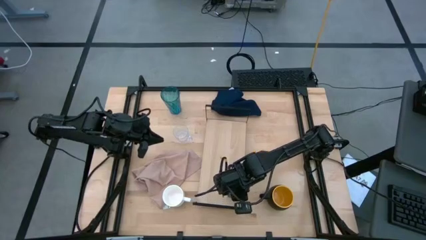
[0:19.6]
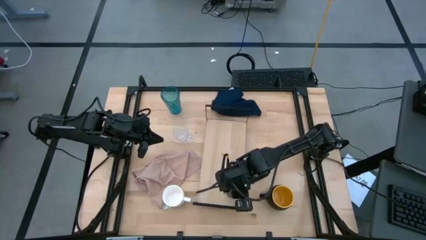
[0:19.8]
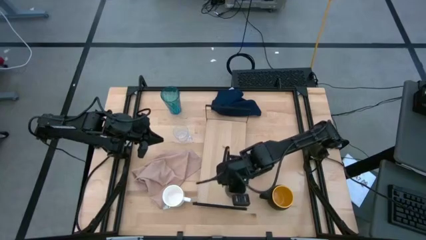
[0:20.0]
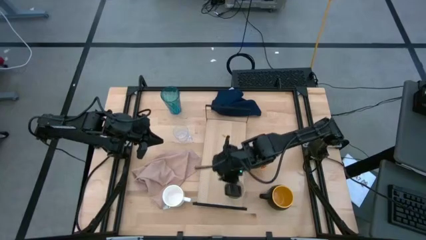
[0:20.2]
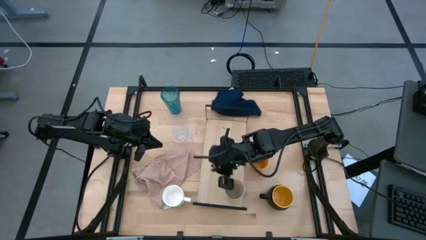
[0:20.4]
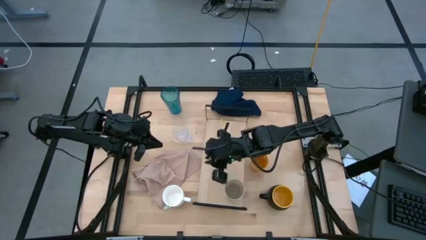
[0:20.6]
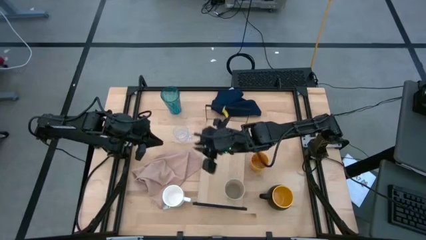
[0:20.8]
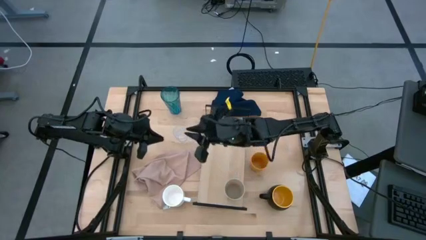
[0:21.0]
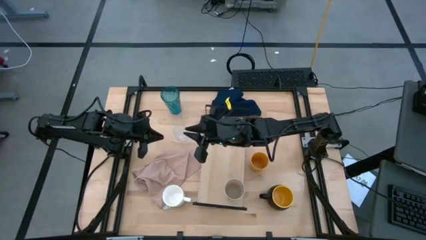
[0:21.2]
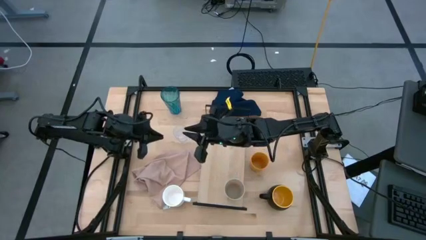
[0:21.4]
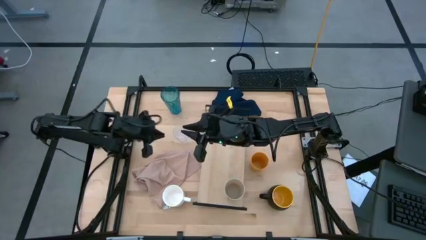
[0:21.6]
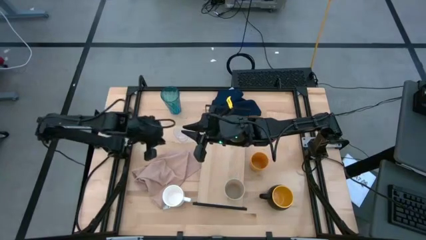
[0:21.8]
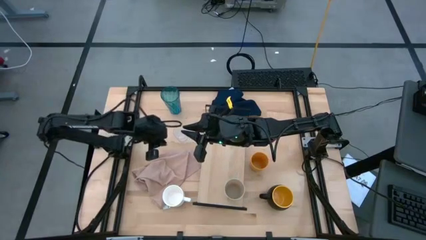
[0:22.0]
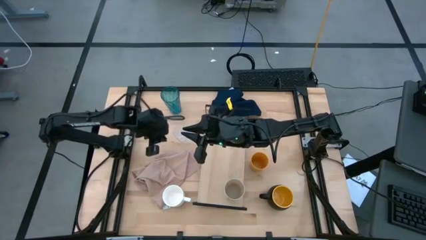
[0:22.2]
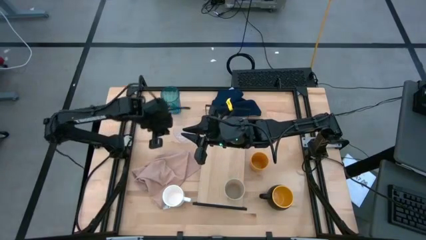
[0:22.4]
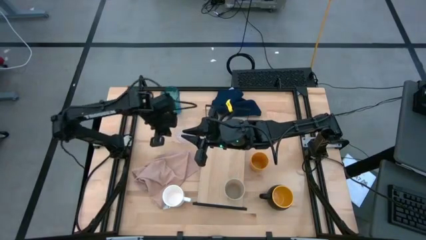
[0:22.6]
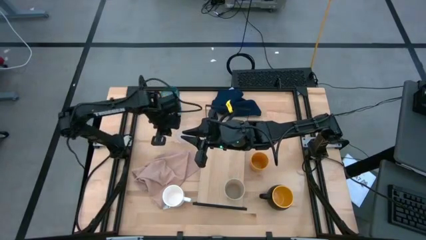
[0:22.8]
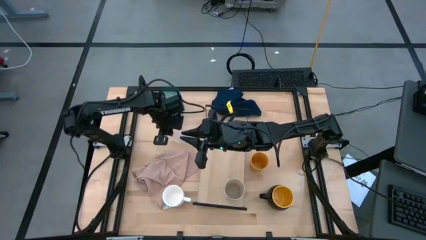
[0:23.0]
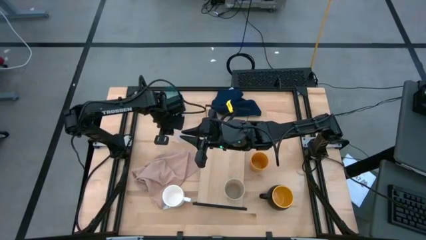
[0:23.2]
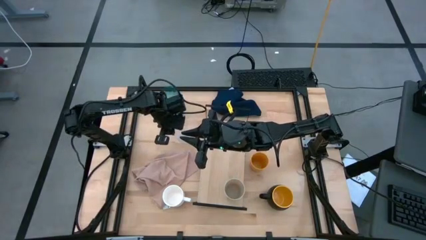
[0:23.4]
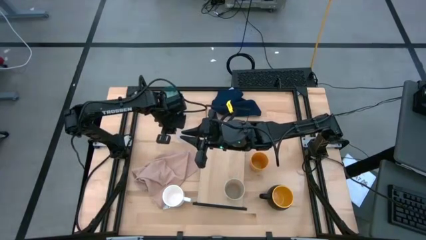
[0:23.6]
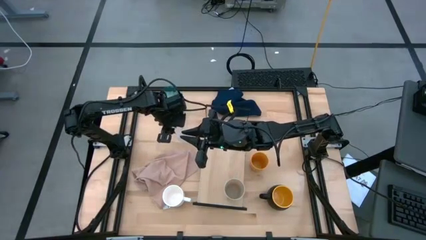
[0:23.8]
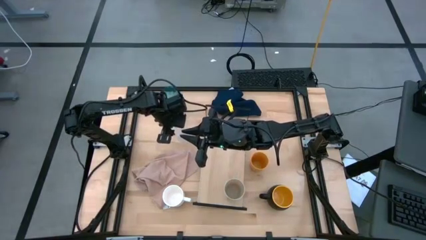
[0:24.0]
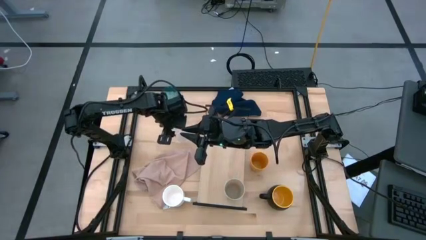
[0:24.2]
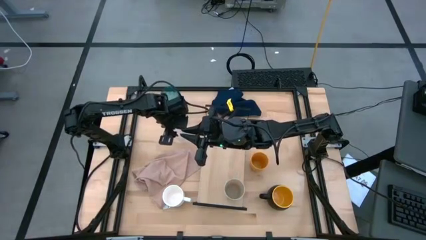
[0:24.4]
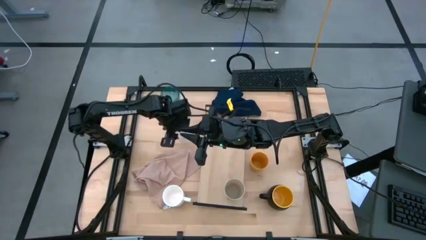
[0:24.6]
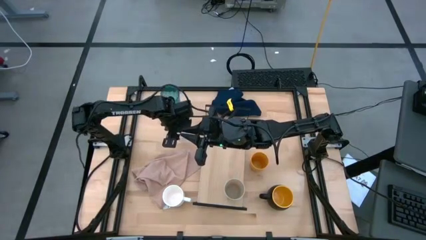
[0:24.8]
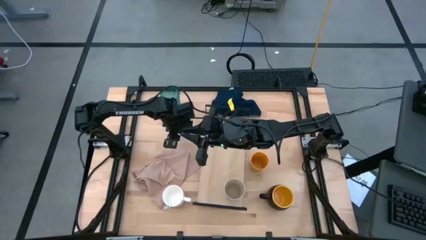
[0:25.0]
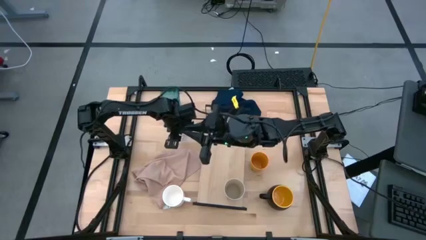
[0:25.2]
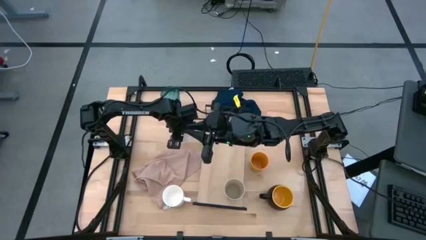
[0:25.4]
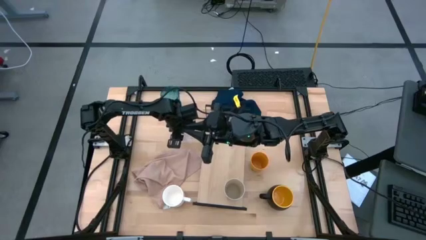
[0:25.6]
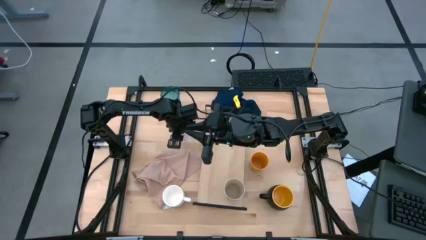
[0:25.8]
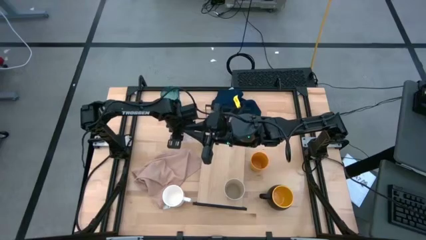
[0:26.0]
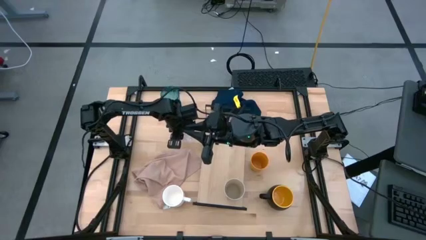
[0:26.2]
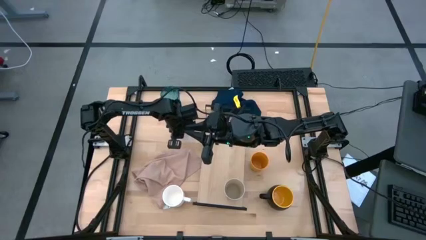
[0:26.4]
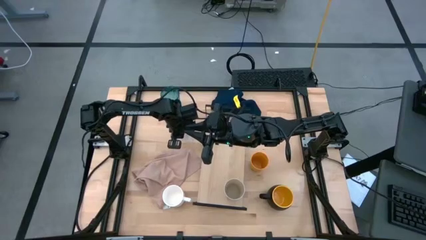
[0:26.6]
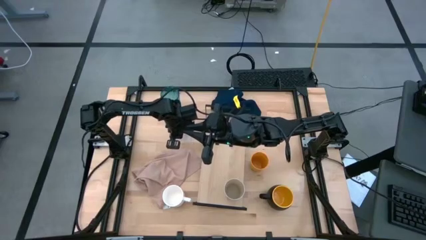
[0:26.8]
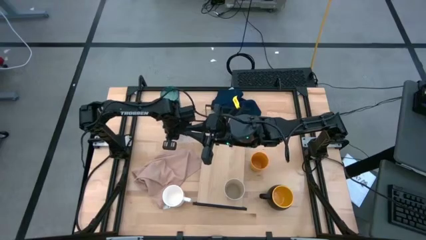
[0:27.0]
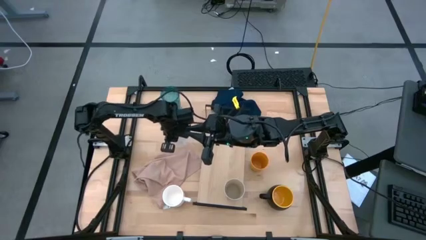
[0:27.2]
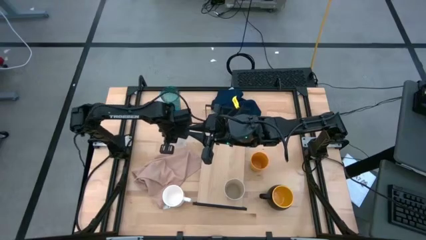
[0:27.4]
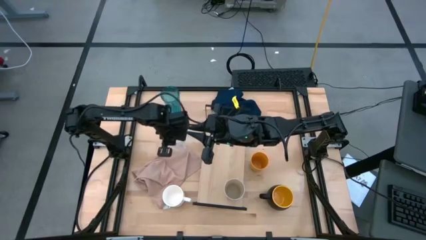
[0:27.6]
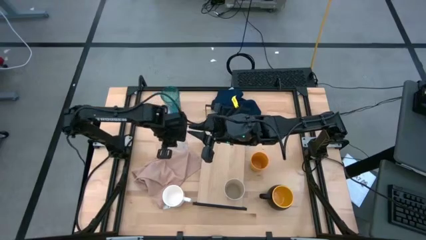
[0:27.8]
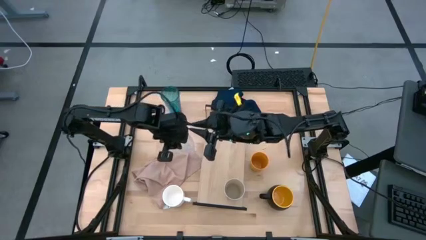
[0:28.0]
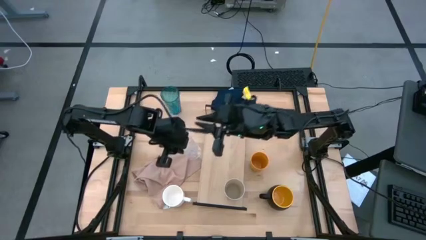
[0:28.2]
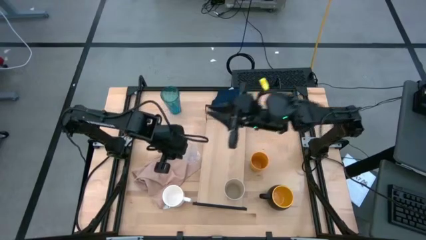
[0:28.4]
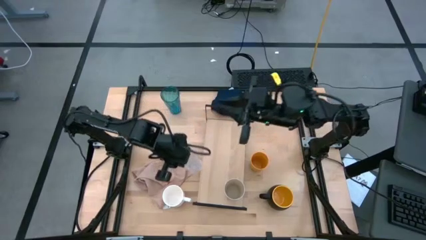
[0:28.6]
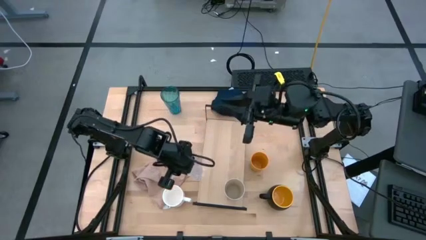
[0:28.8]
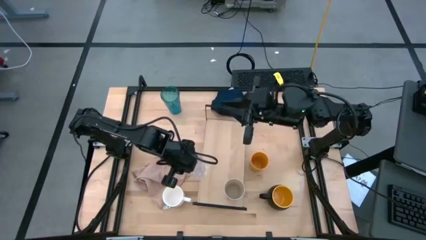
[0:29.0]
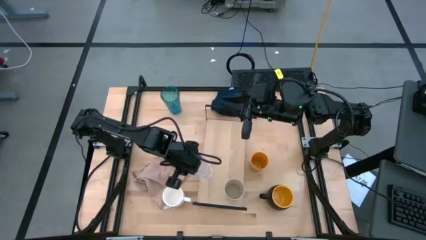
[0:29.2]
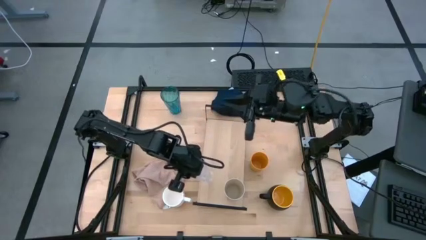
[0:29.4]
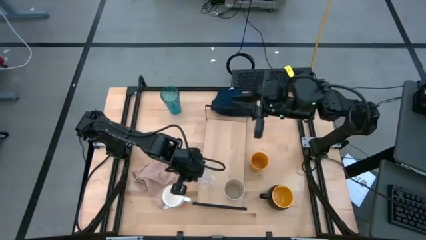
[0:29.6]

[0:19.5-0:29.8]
Task: Stack small to large cups/mugs on shelf
Put the transparent cup on the shelf

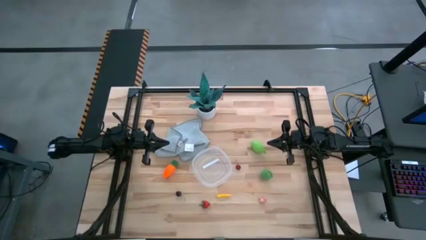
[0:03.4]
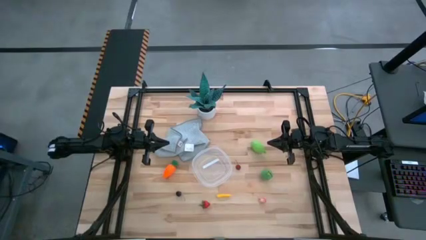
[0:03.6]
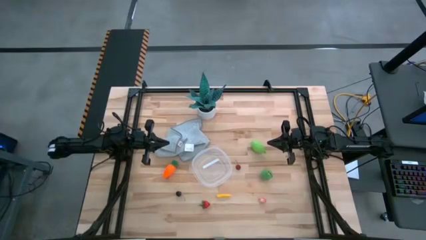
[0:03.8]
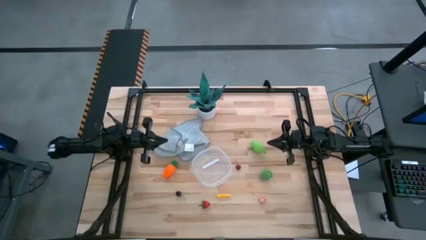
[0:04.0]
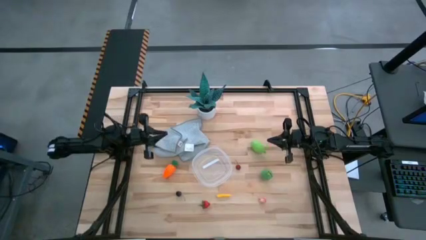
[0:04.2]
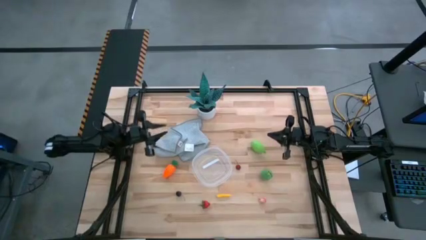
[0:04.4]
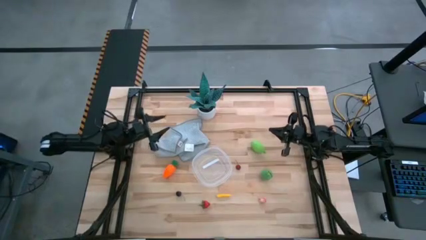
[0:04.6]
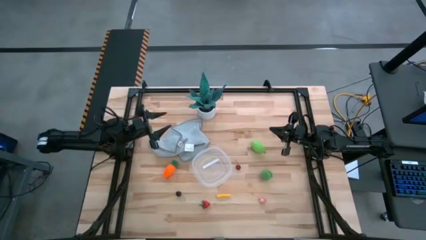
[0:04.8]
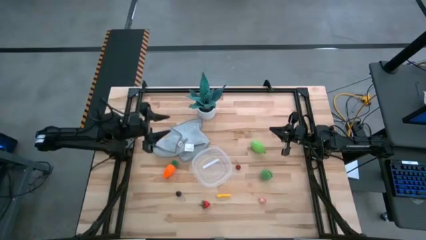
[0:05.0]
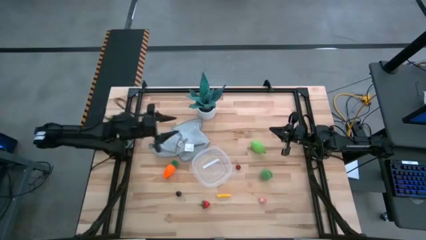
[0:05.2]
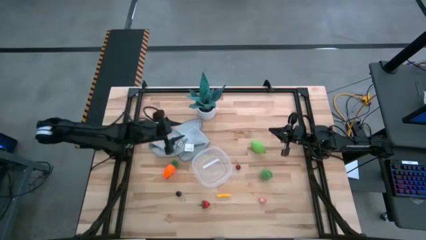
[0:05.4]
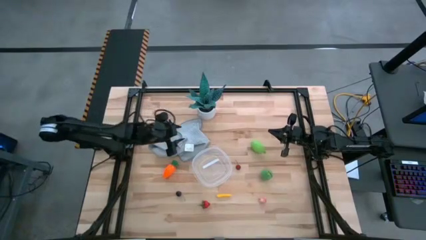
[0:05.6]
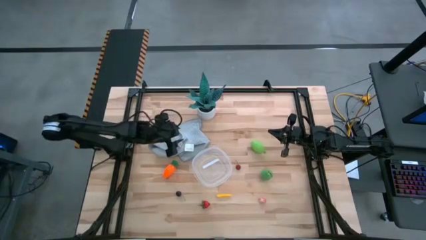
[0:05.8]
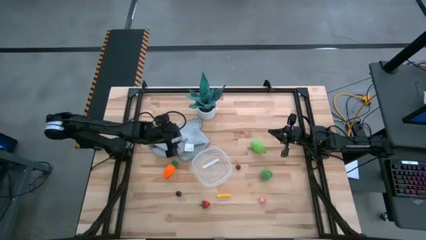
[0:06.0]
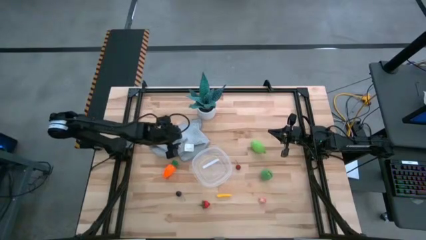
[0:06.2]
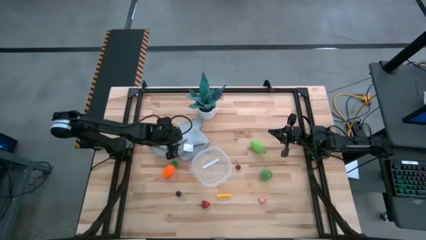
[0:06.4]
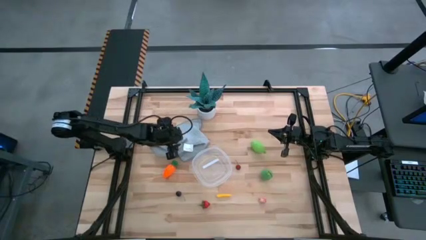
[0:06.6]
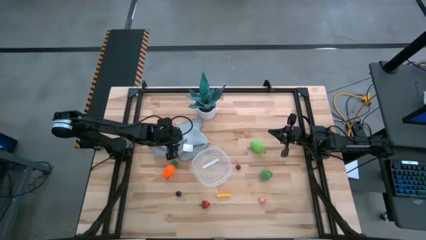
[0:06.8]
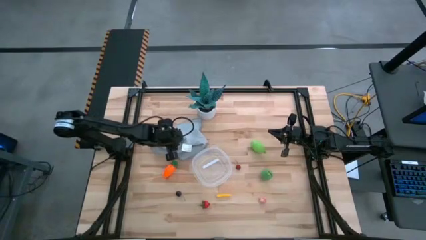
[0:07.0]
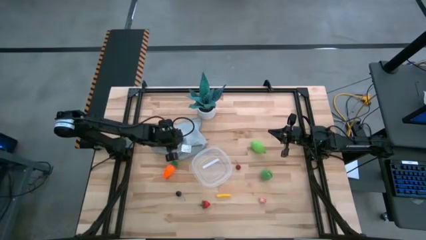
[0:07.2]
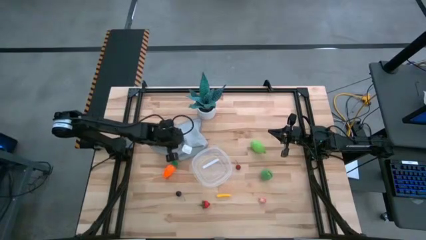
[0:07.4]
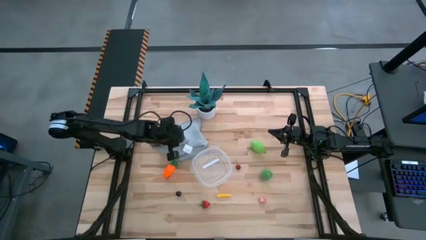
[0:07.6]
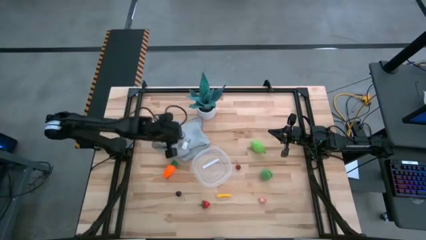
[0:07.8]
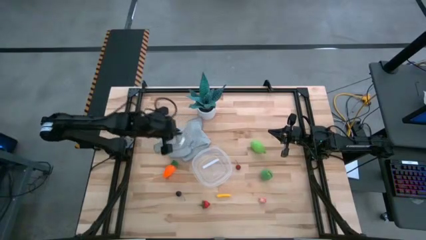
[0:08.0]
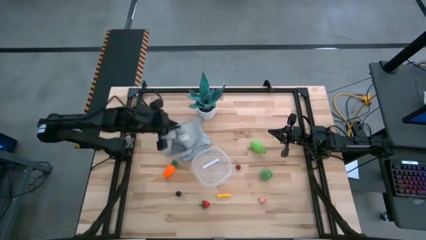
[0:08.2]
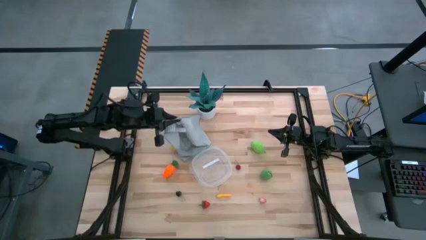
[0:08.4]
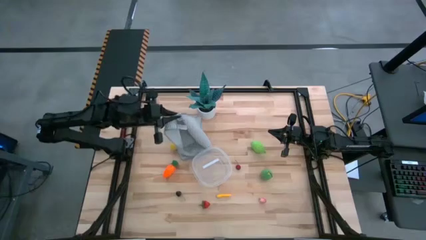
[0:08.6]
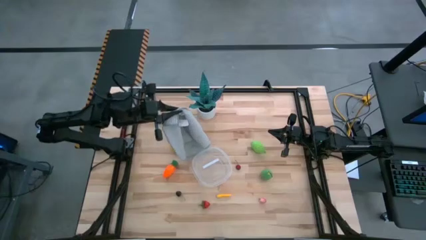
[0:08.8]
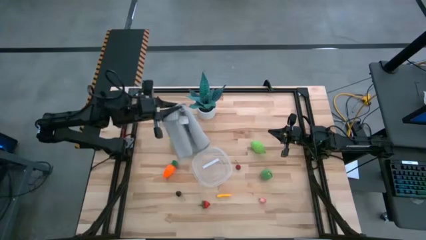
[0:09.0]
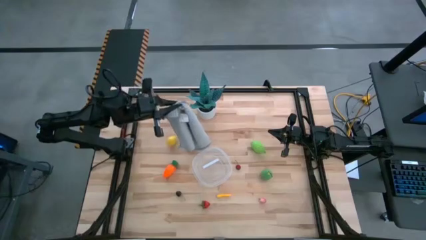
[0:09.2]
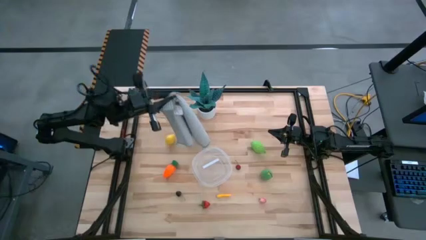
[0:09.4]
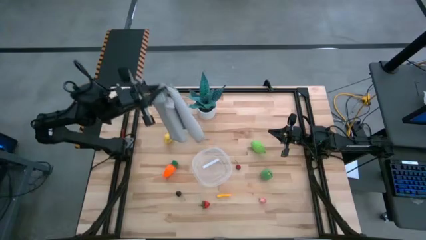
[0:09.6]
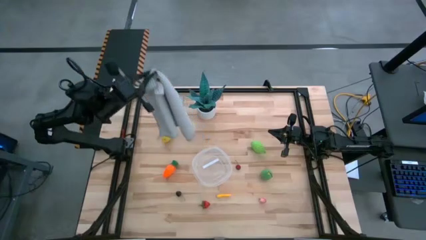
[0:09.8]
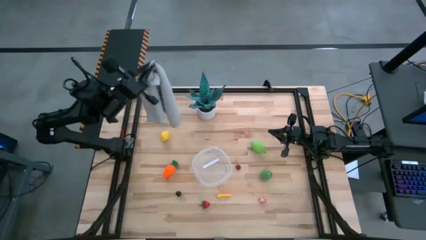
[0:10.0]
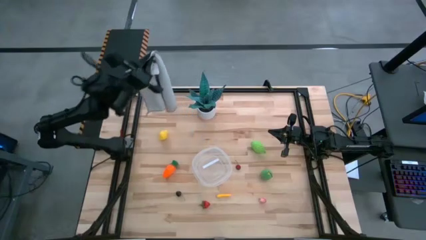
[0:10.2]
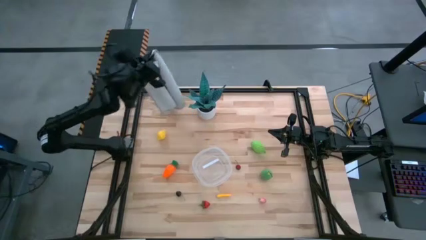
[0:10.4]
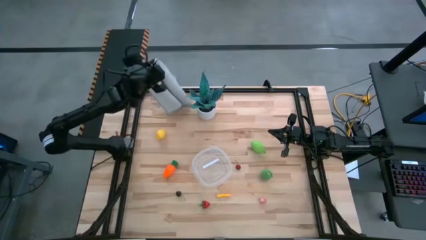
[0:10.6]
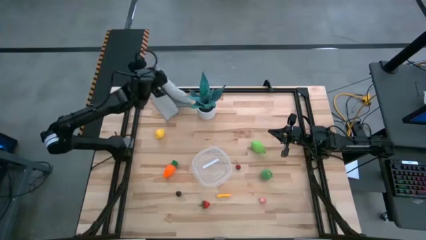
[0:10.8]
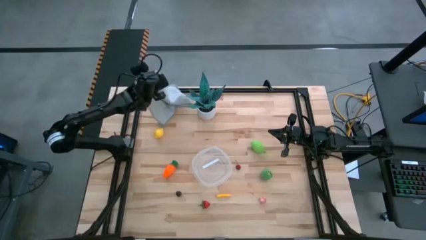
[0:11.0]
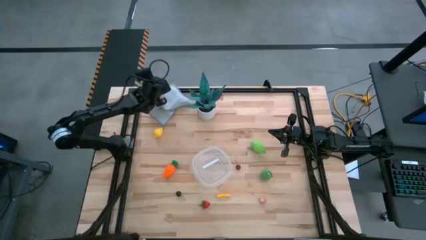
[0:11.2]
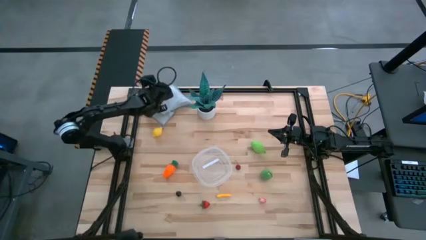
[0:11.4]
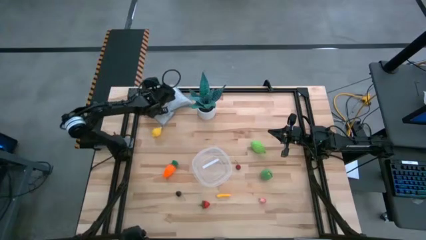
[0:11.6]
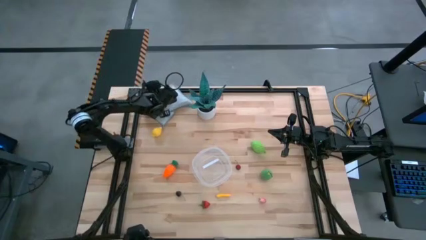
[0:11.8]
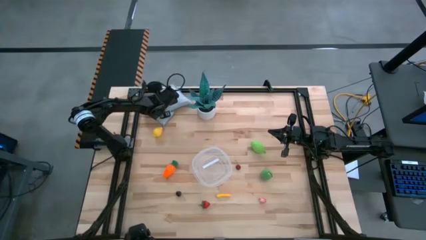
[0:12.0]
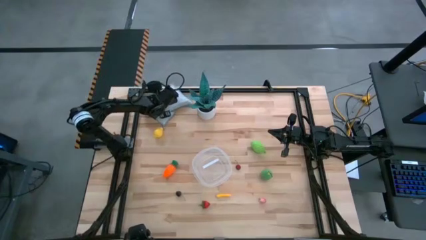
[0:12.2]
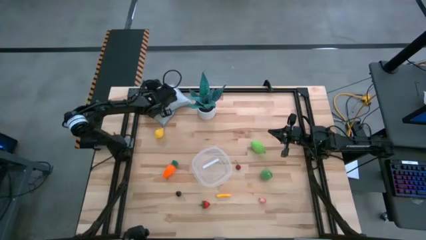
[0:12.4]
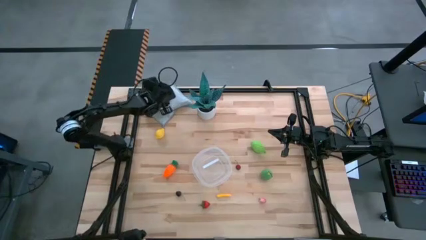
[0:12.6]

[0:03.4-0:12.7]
Task: Pick and placing Produce into tupperware
Move the gray microfiber cloth to the top left of the table
